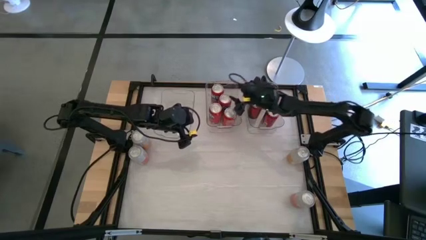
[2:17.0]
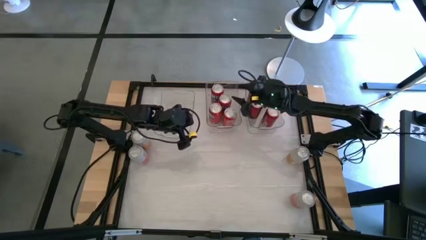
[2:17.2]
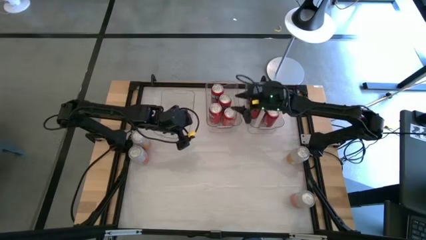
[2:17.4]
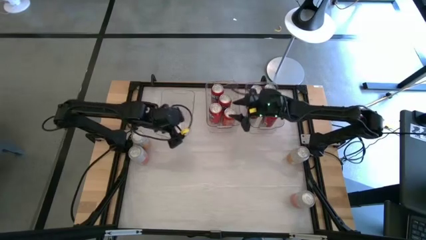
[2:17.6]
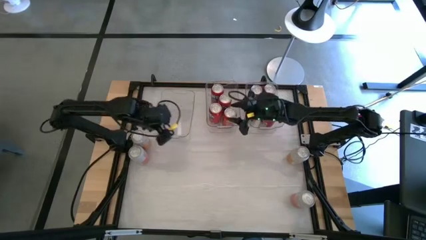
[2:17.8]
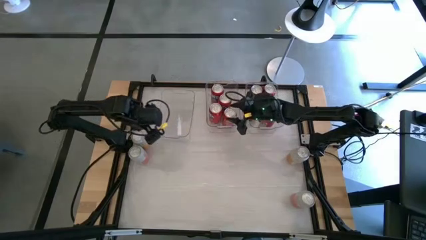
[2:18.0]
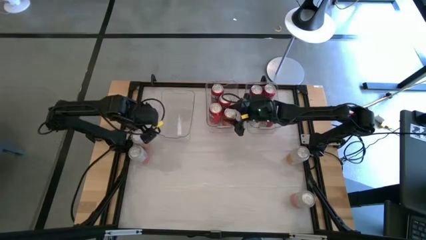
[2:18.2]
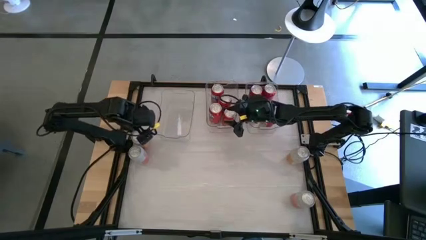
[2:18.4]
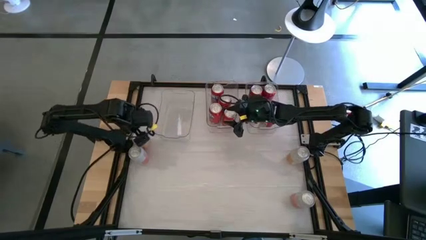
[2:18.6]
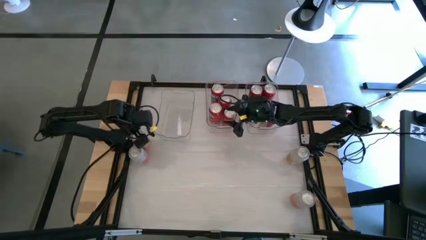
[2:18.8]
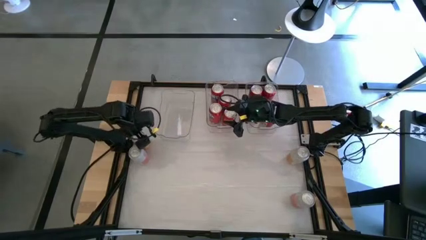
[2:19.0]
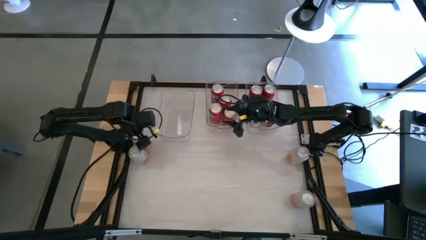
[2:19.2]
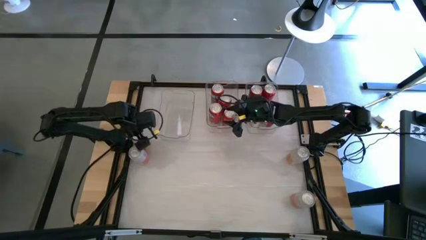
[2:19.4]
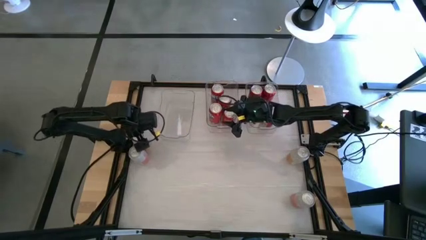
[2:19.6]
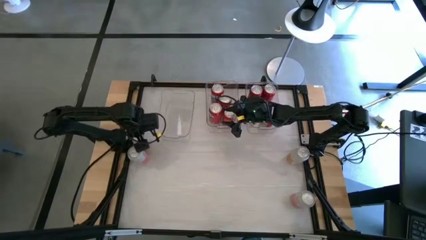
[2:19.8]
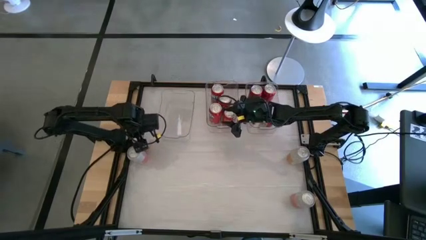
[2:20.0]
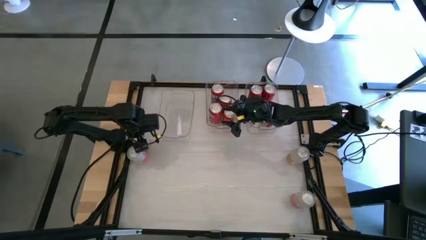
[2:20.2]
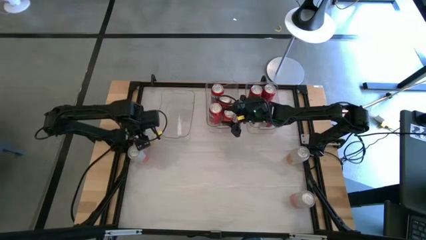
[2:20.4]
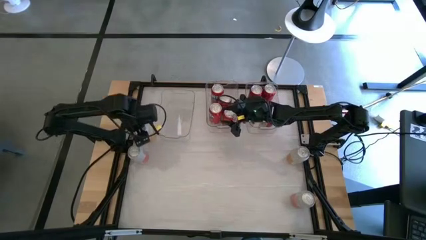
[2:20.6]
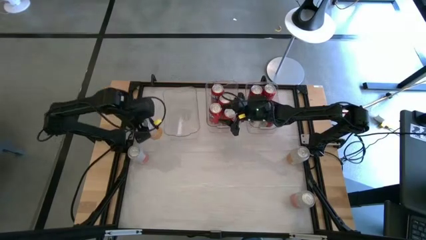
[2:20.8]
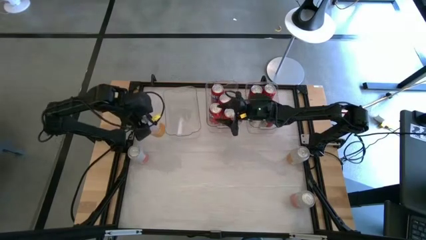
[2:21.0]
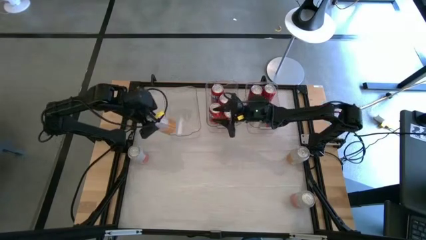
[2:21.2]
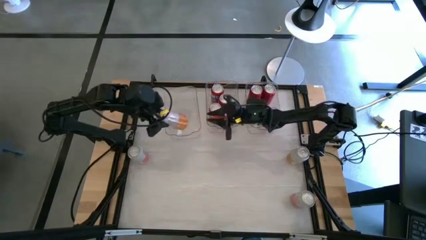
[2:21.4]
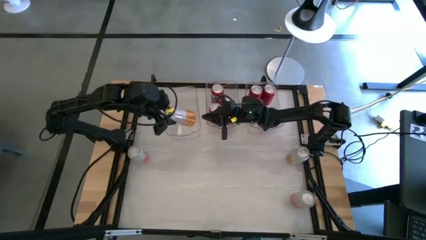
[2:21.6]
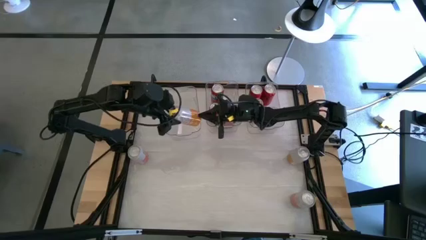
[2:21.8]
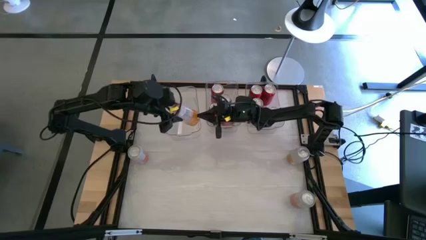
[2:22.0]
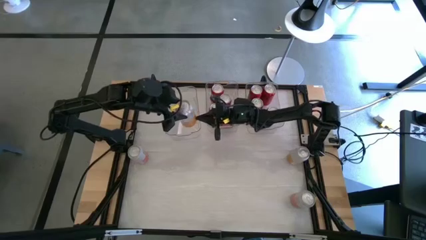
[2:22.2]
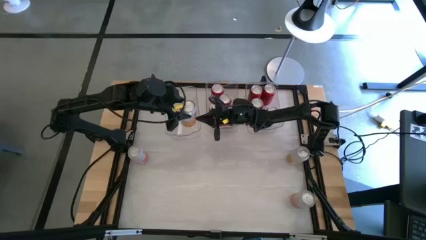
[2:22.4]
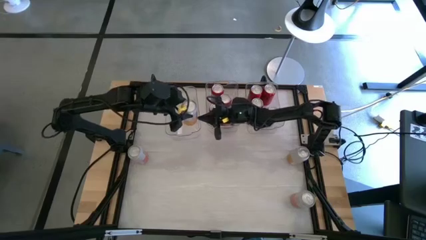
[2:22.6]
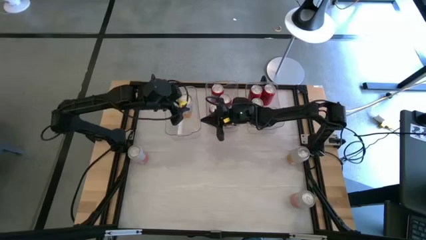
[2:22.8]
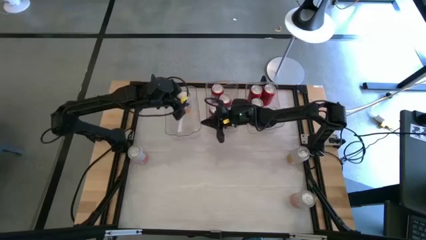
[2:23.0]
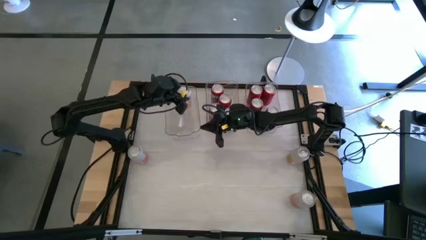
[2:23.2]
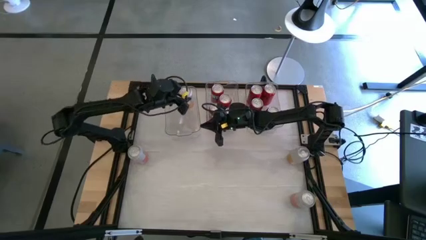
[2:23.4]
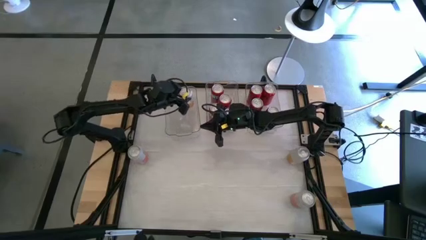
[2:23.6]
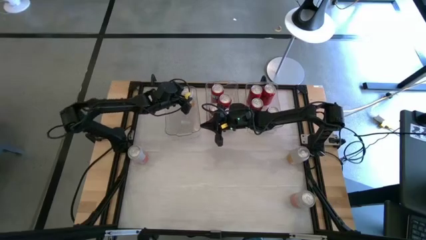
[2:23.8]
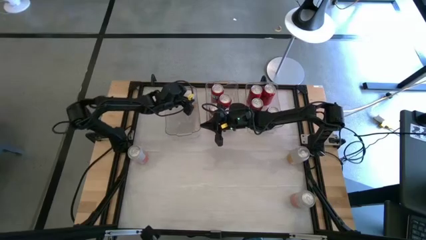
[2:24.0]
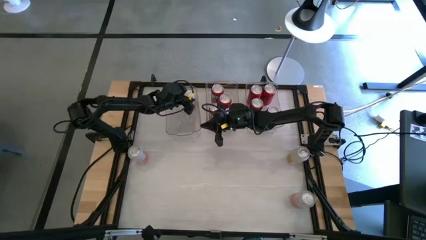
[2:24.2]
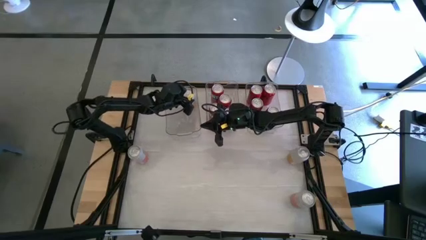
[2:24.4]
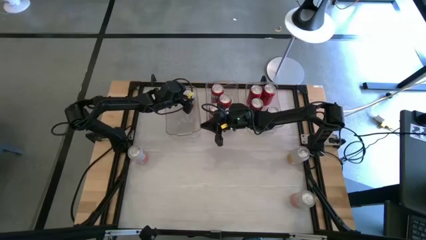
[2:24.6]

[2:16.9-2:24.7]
Task: Sort soda cans
Put the left orange white soda can into the left transparent bin

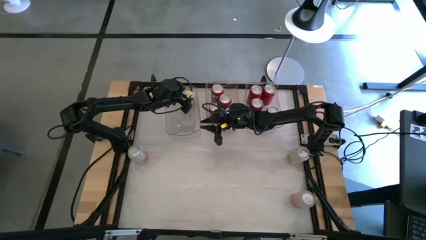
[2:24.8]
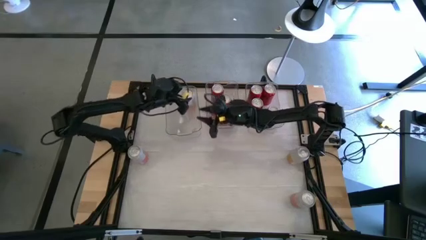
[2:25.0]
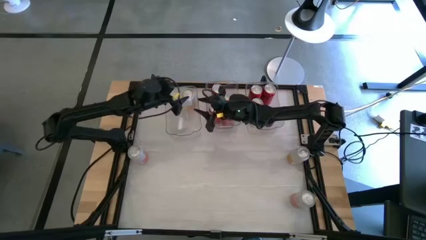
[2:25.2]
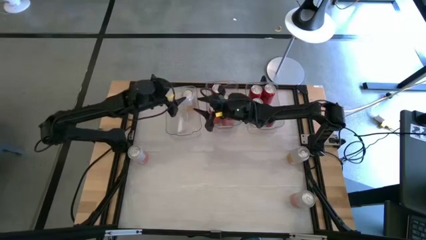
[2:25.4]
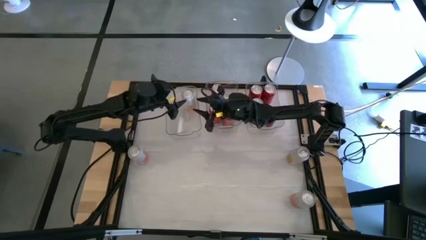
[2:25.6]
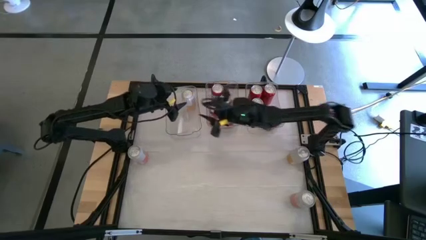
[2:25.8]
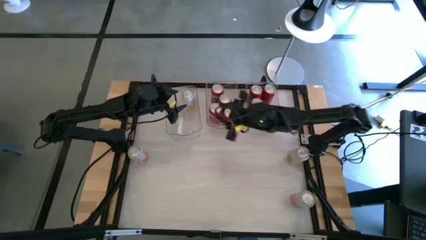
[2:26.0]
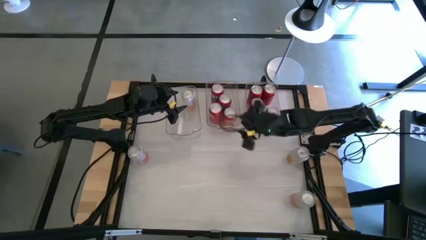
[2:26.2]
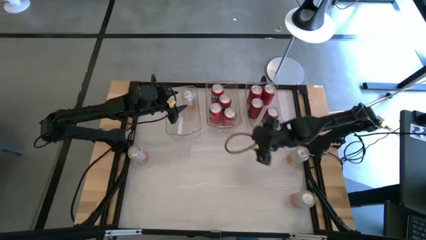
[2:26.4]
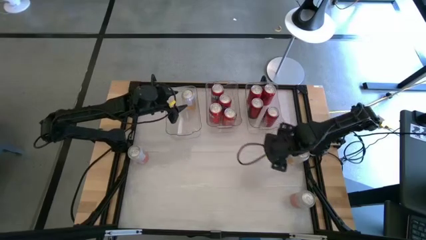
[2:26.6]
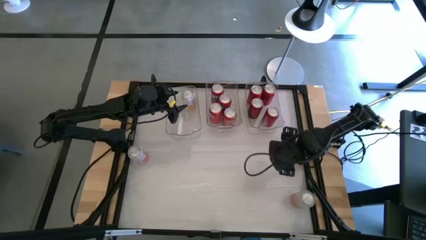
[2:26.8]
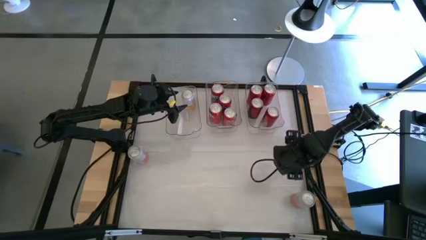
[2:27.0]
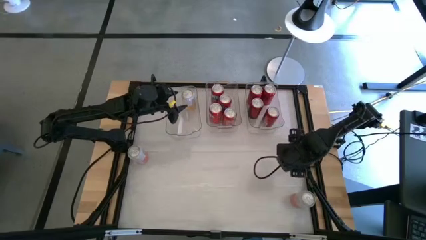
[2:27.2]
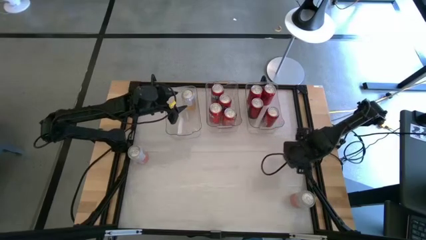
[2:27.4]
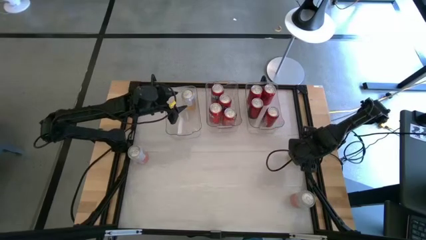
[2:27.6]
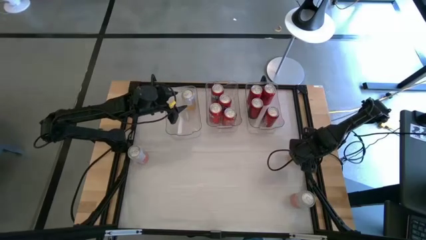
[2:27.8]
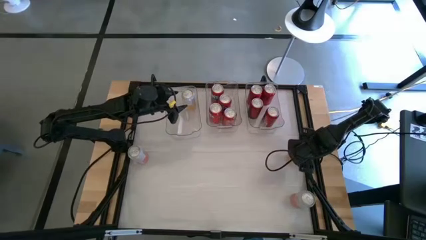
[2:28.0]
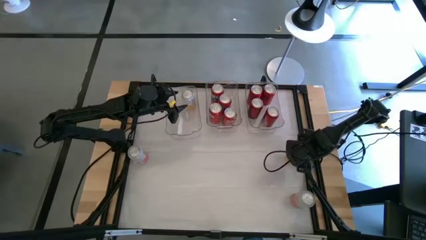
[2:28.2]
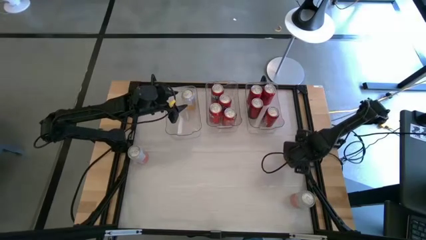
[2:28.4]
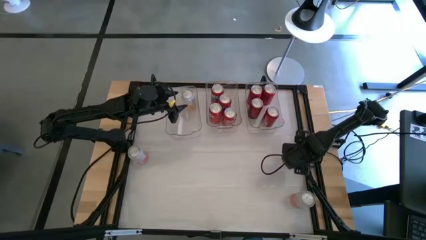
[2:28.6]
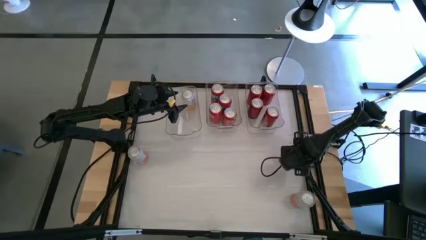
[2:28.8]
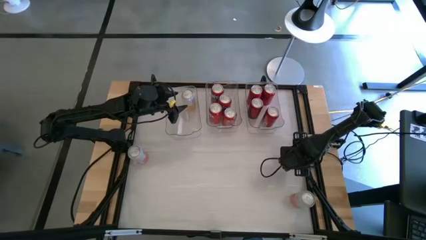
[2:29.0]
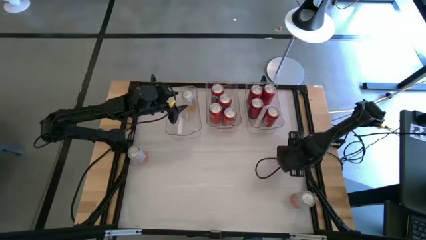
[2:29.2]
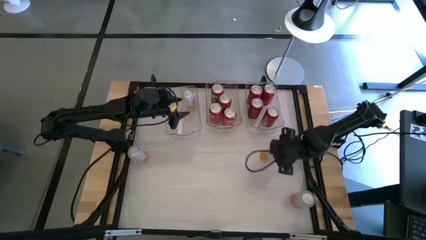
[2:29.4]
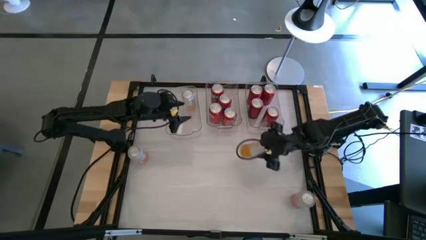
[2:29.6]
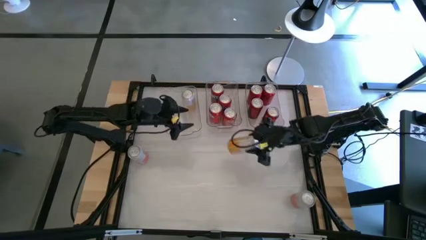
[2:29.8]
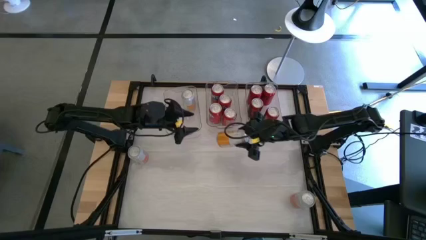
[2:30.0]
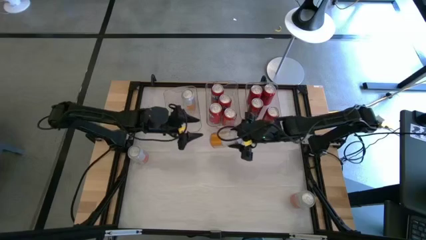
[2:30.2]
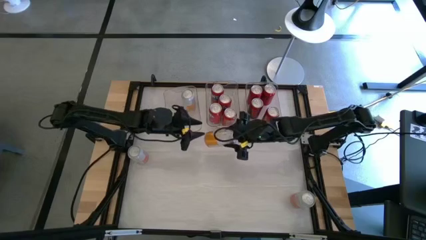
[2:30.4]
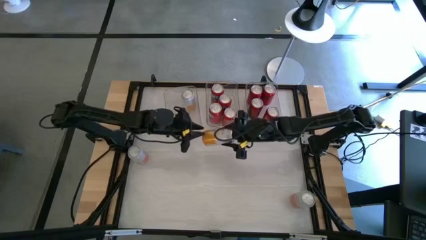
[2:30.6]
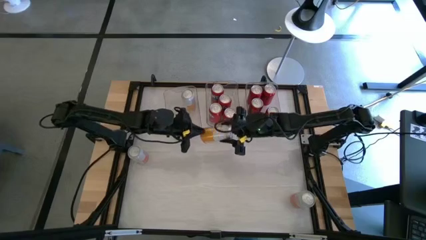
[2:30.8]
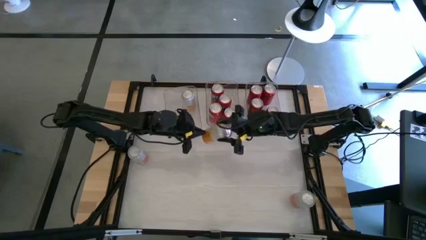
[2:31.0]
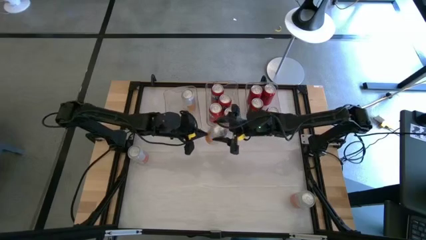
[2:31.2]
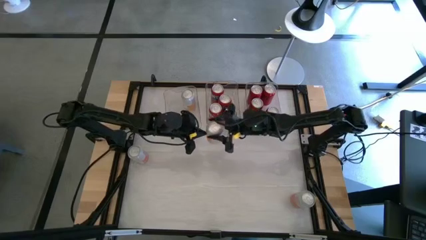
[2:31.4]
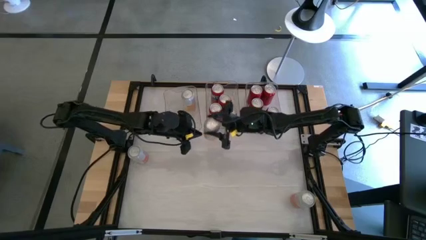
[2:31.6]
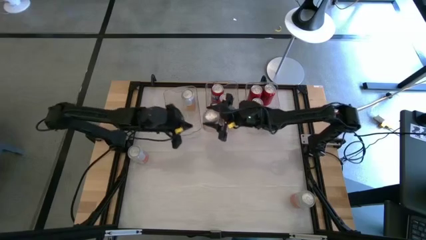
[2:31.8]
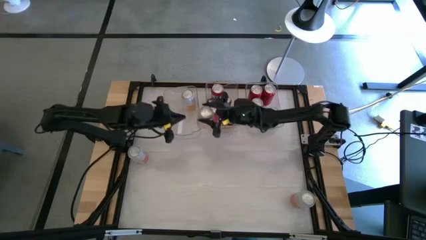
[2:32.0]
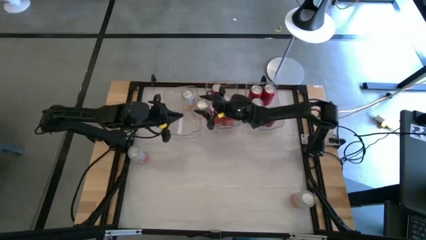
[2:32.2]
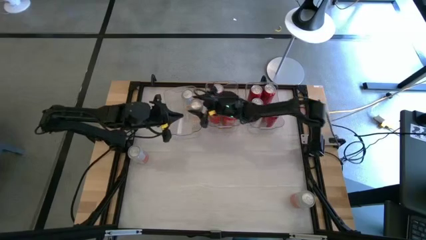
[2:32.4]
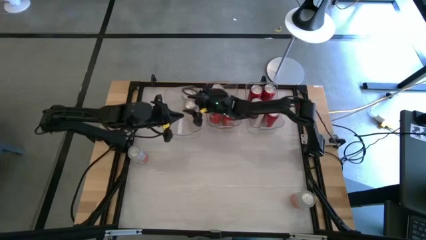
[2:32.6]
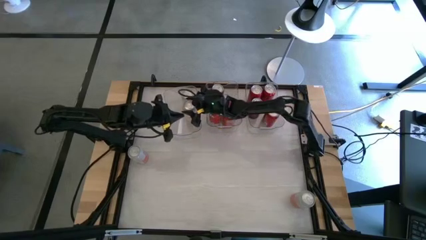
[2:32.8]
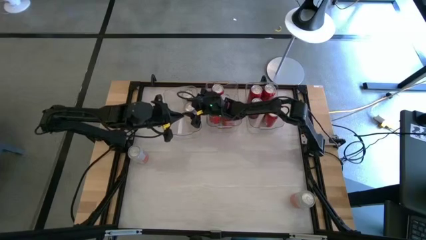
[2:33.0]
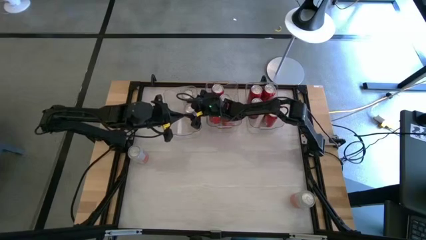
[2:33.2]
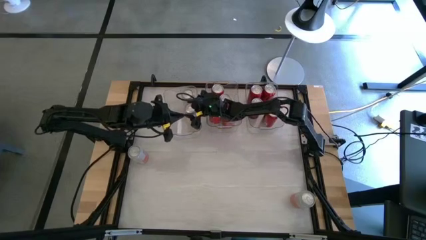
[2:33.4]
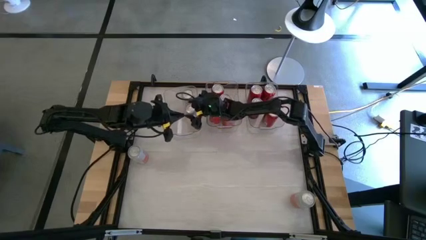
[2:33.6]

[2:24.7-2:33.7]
Put the orange white soda can into the left transparent bin
